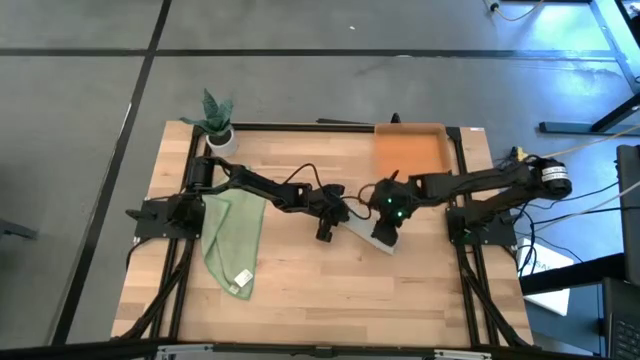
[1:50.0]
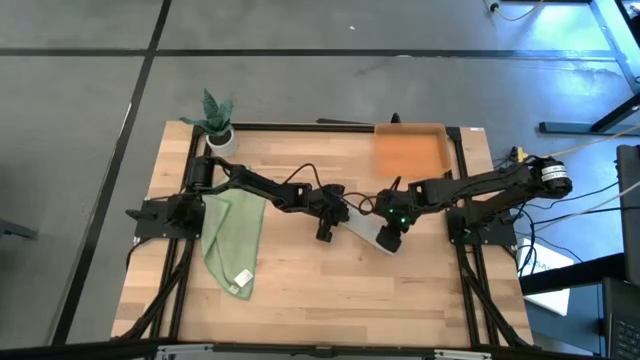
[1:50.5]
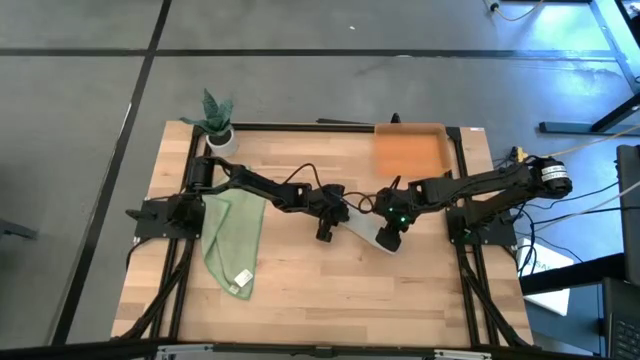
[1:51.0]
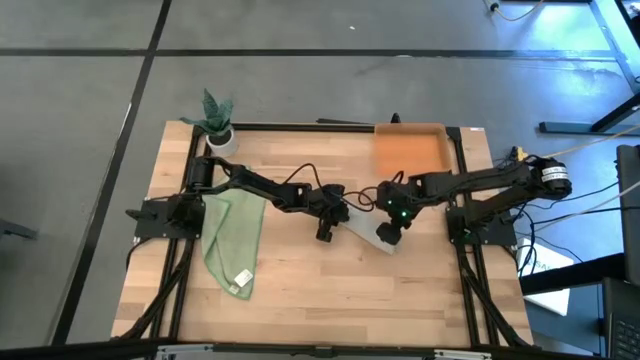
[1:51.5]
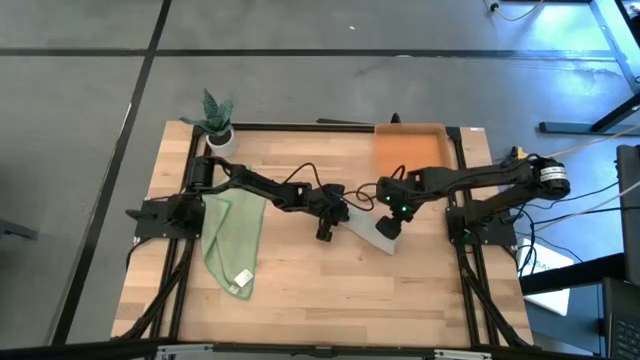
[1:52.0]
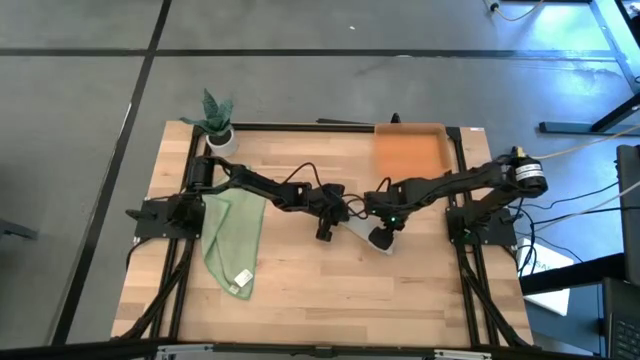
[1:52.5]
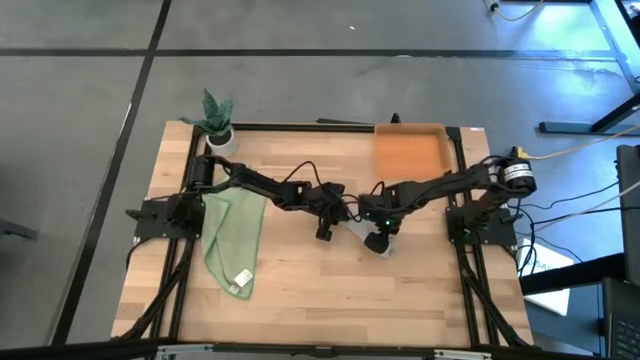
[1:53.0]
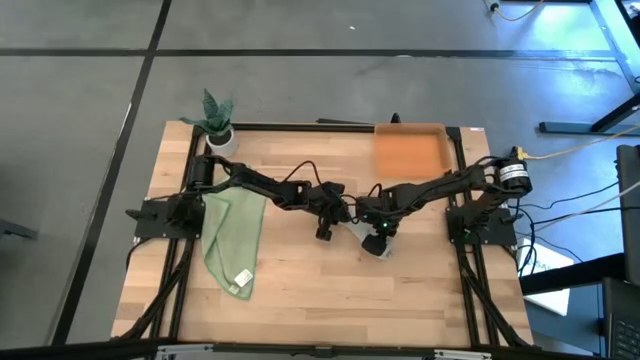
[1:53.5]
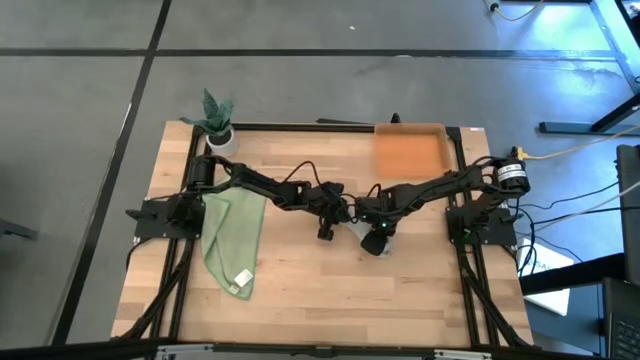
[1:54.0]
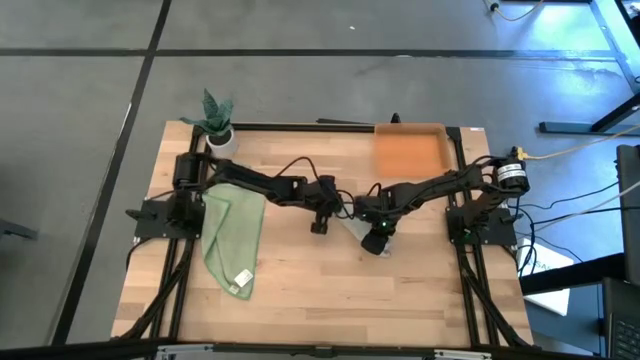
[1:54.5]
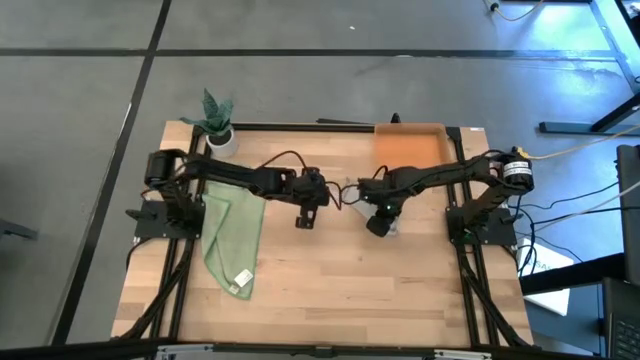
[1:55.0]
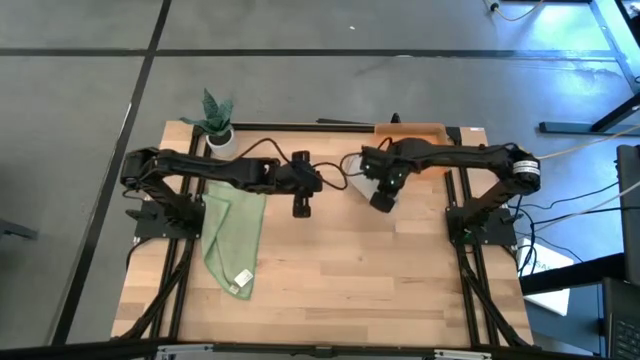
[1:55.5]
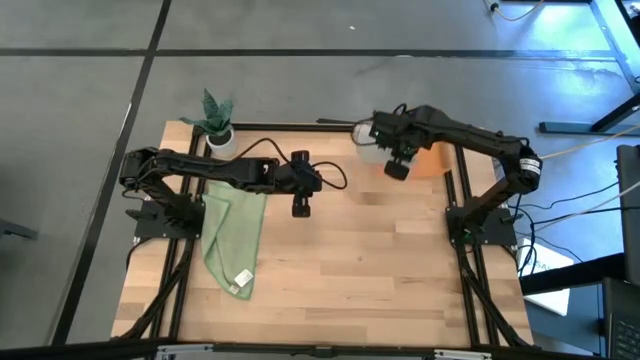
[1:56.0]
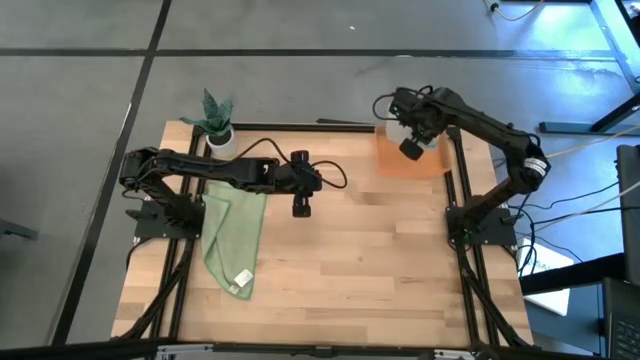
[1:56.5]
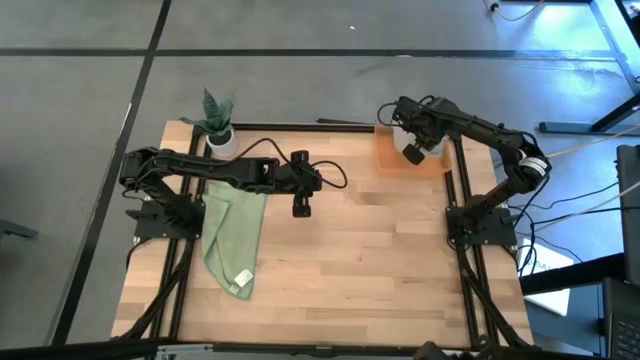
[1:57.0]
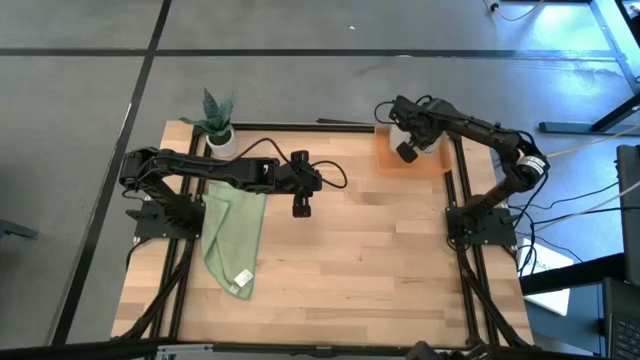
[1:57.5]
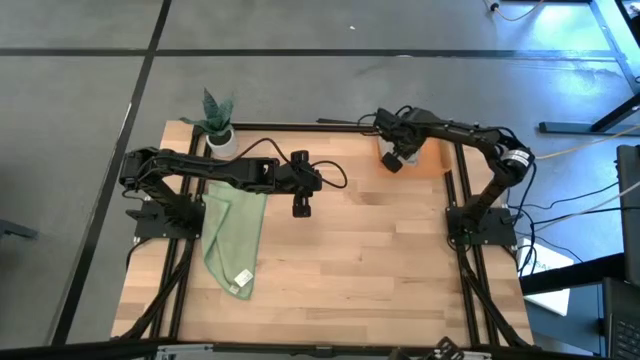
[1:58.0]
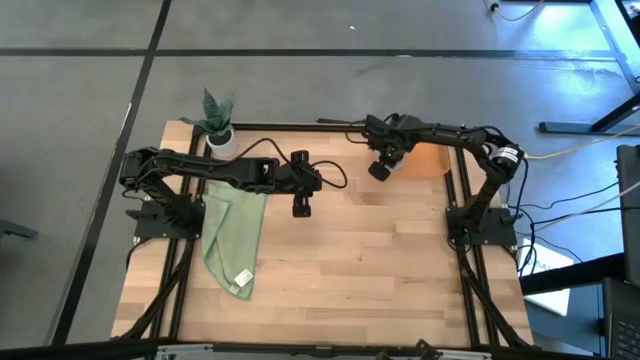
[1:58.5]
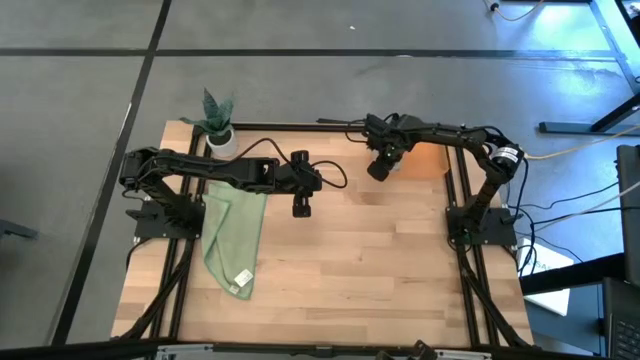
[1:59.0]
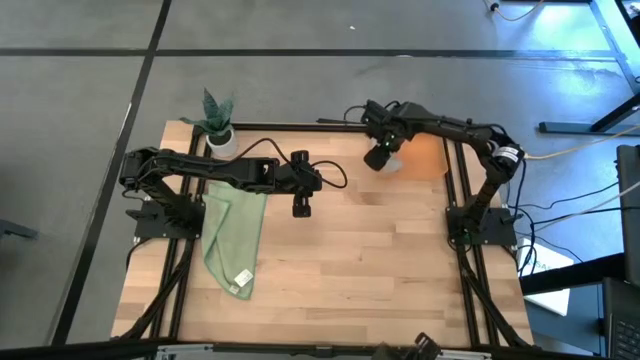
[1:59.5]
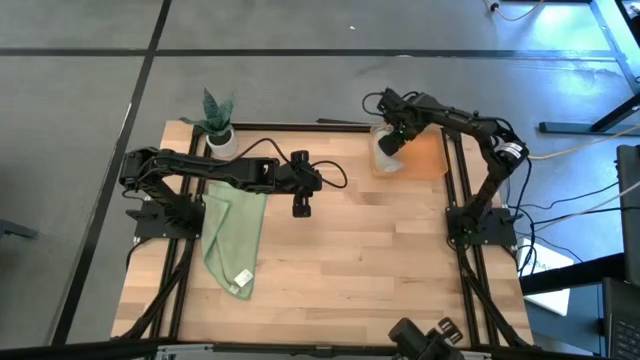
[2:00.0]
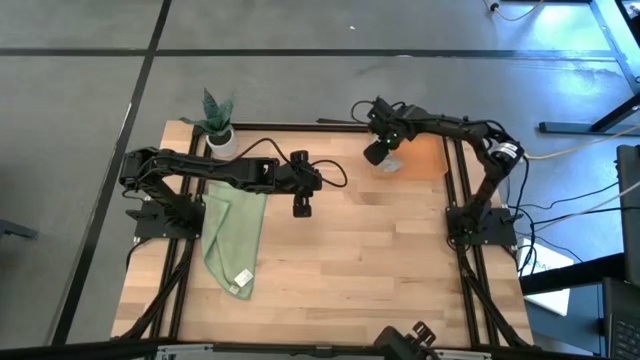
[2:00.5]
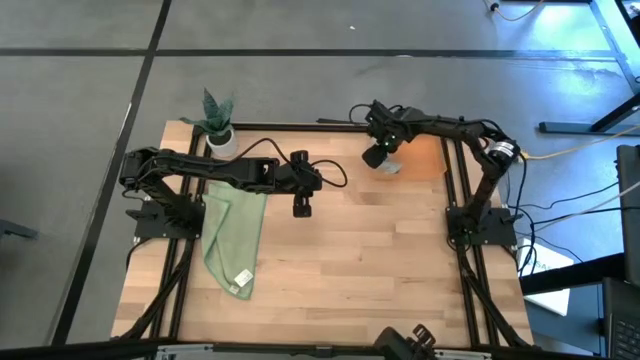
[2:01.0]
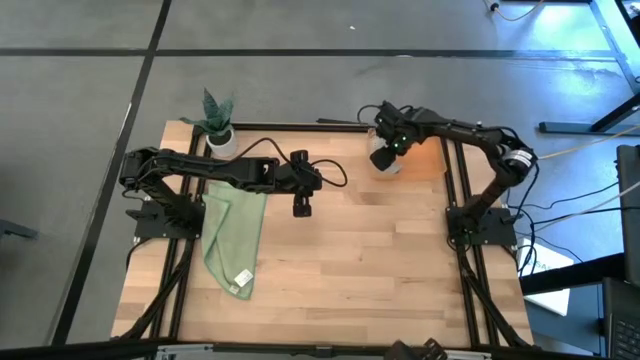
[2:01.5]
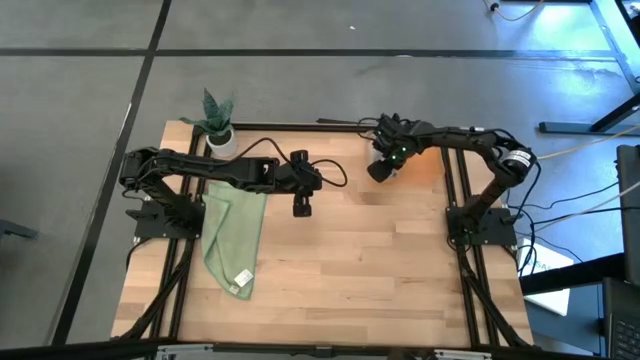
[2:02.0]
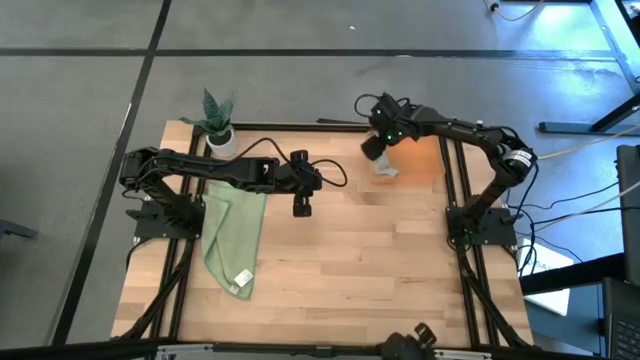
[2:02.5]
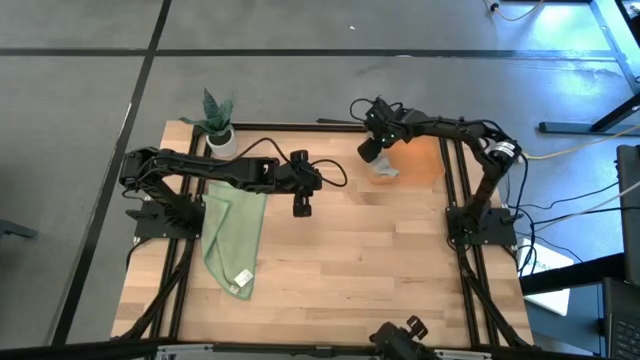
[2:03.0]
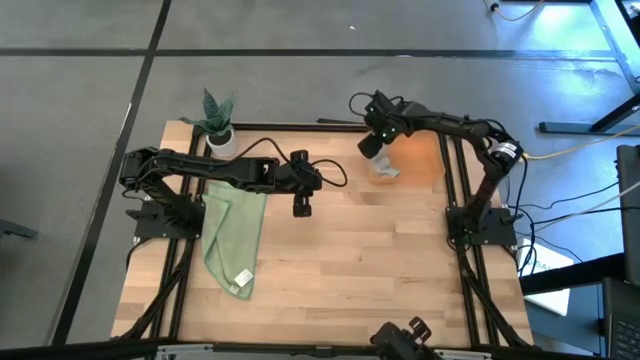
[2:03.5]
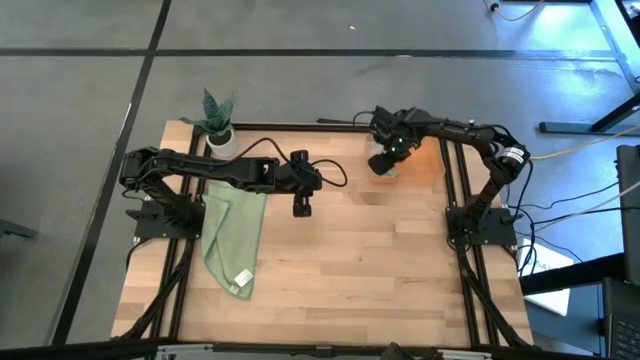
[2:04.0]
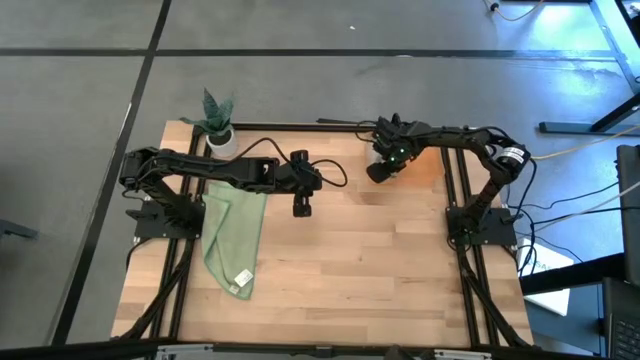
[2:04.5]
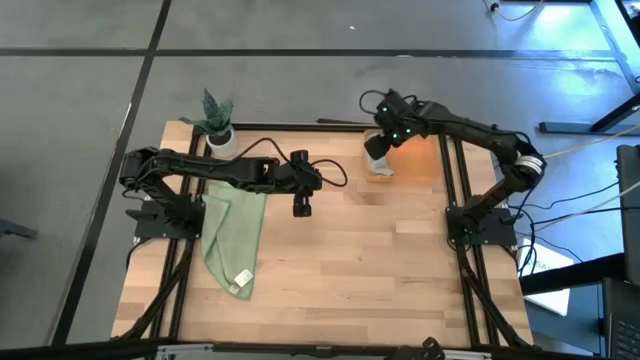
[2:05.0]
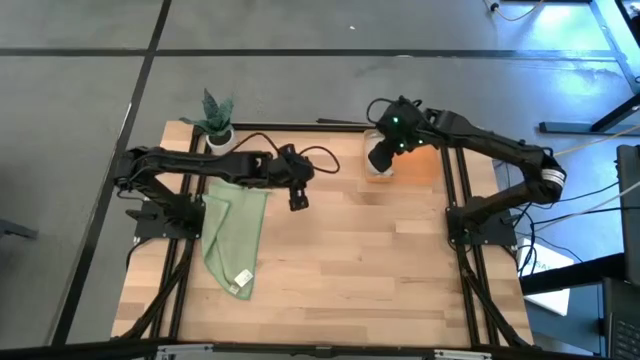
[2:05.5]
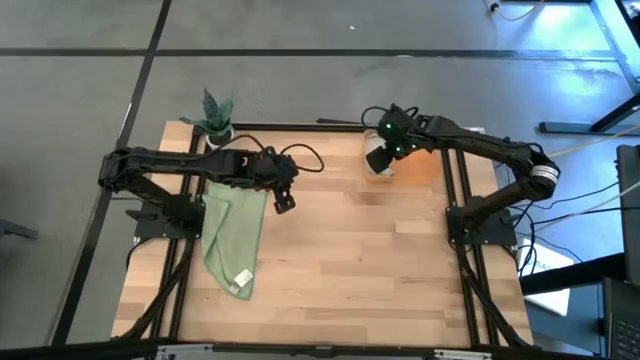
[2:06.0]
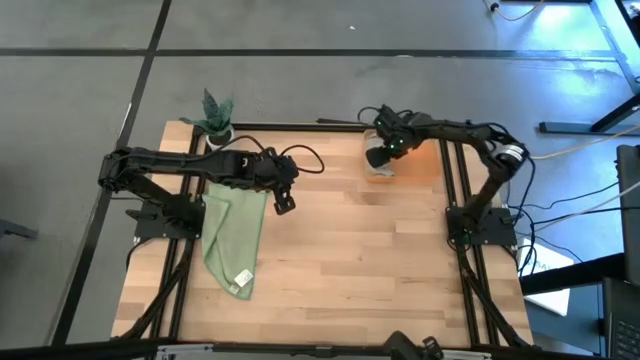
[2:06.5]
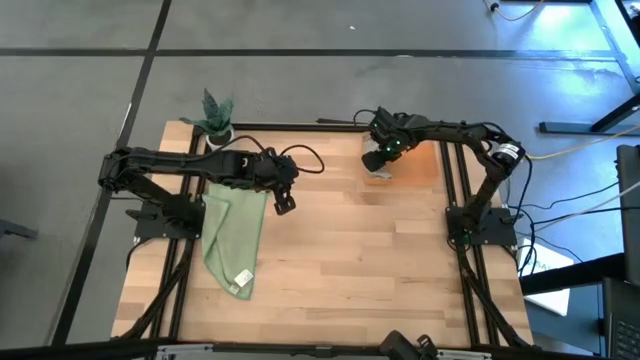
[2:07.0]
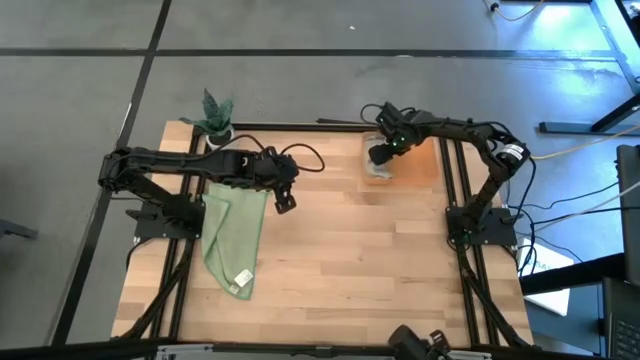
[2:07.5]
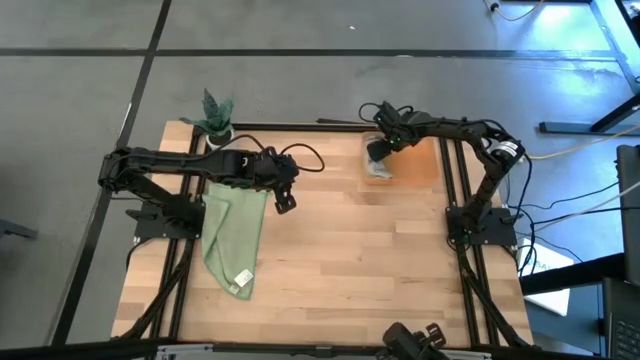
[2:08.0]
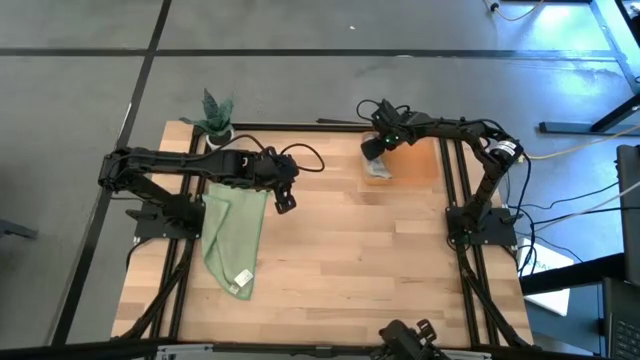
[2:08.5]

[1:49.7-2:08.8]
Task: Roll microfiber towels into tight, uniform cylinder then place into a basket
Put the gray microfiber towel into the orange bin

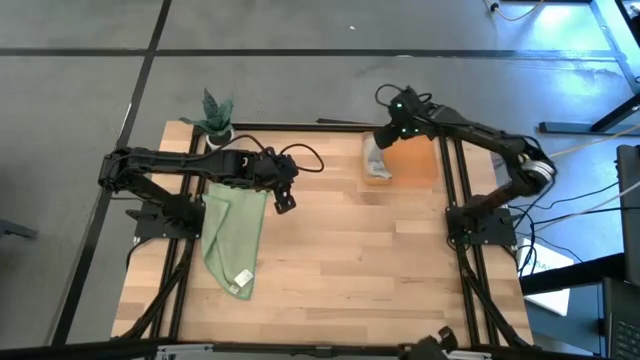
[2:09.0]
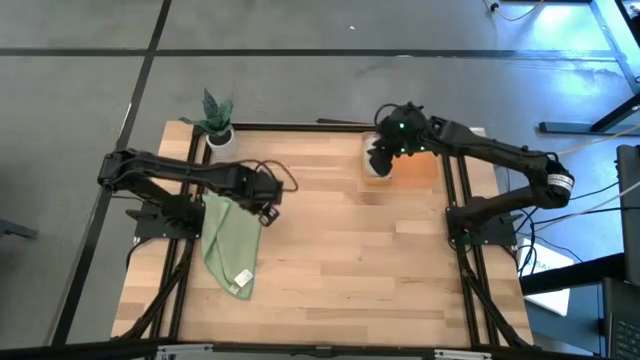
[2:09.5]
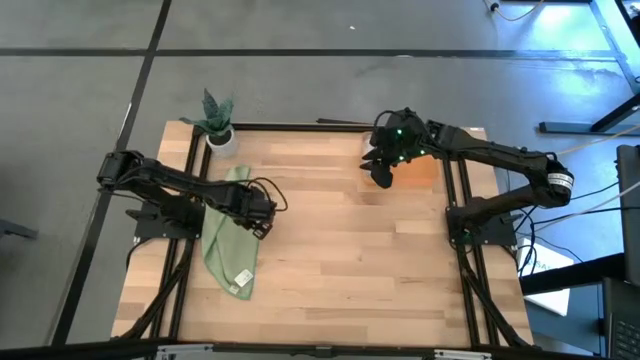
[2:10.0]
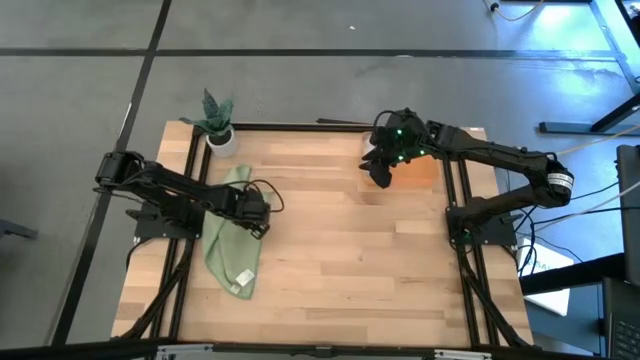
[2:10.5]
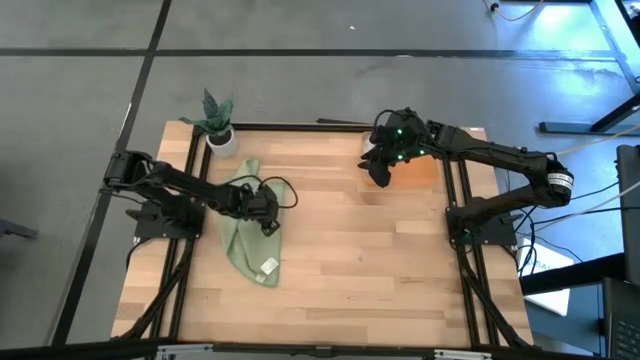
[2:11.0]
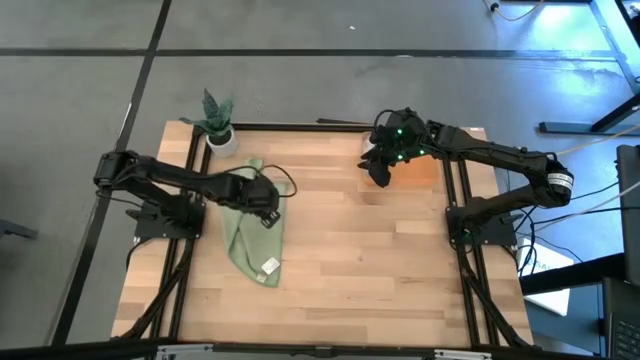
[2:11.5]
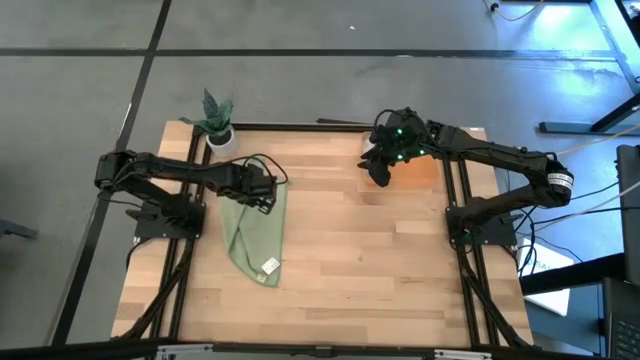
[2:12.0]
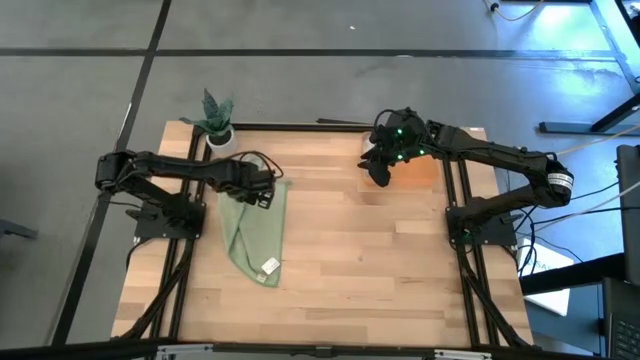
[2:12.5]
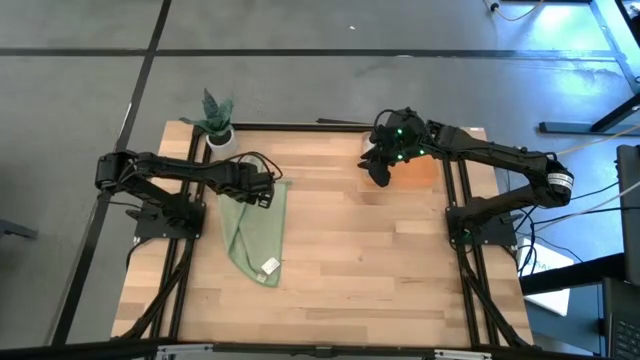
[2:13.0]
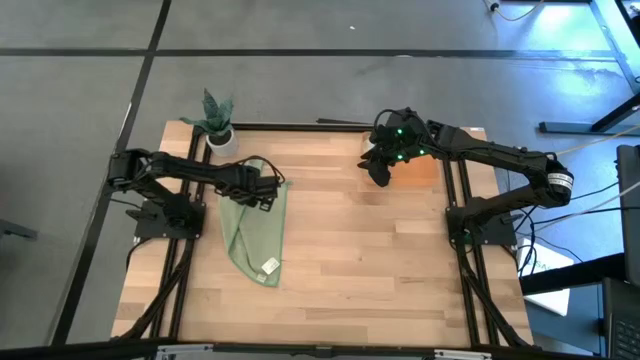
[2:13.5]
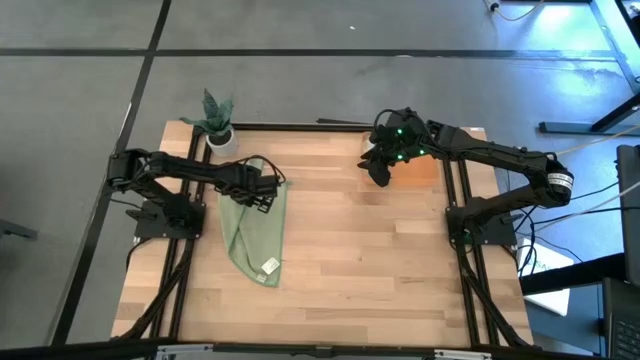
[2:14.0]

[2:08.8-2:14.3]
Fold the green microfiber towel
